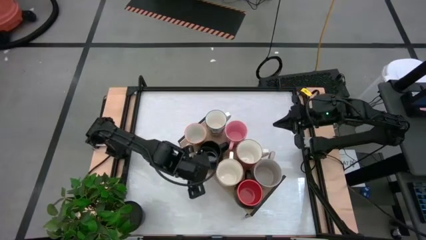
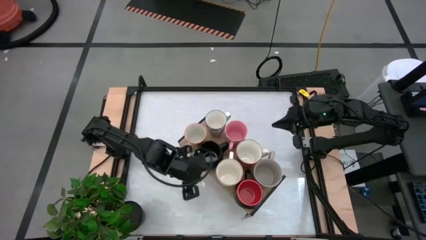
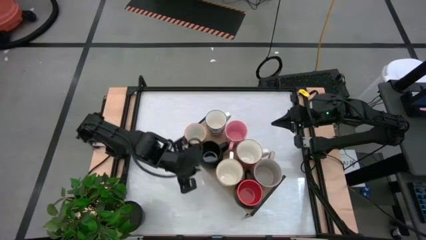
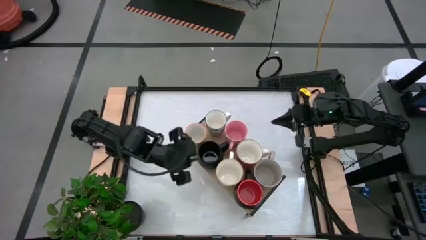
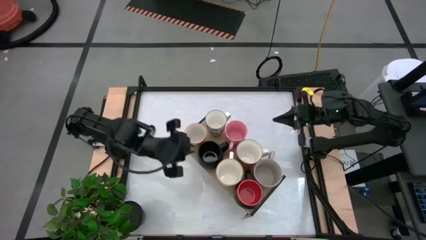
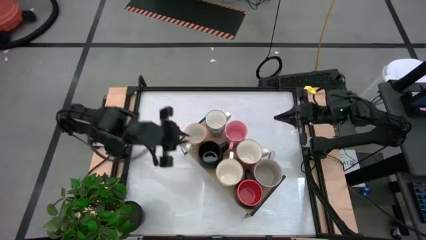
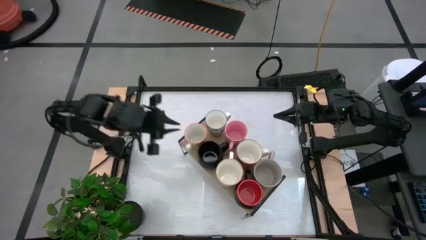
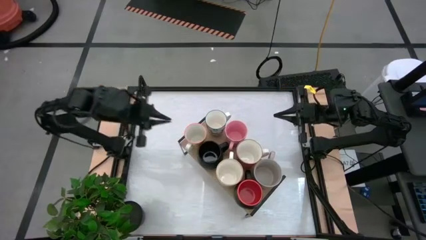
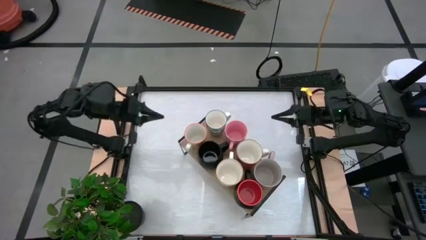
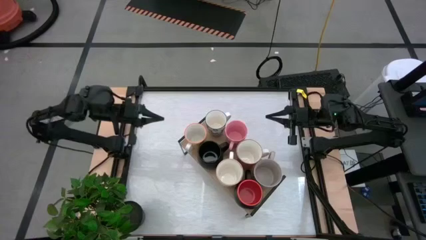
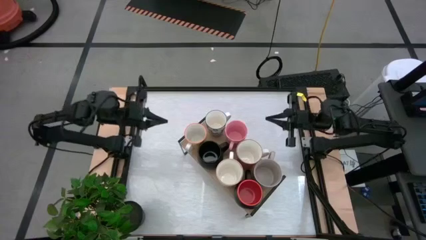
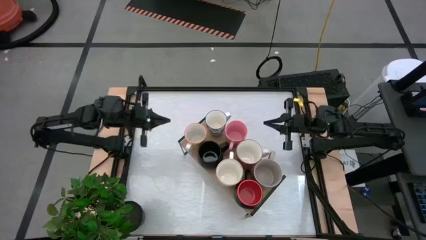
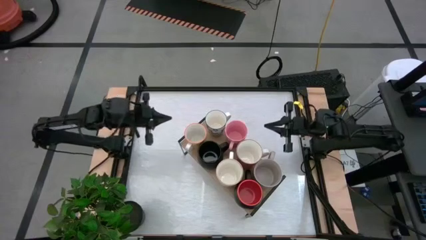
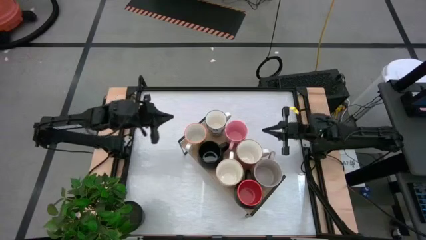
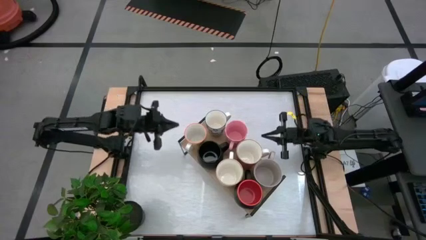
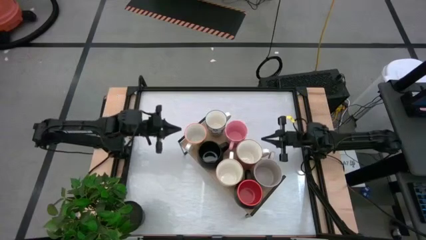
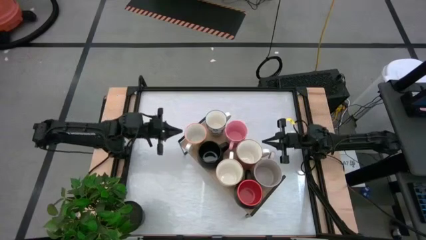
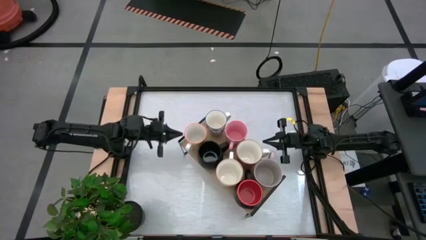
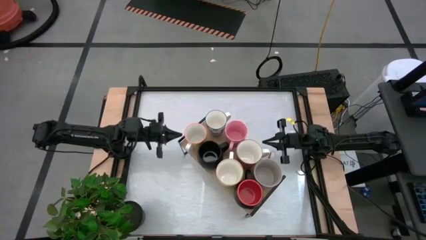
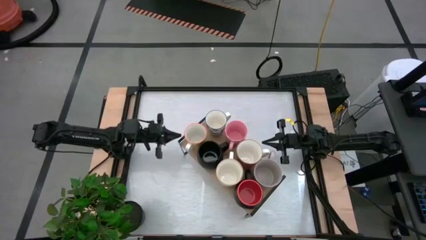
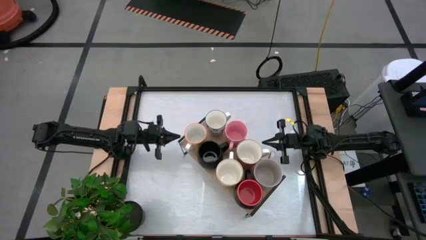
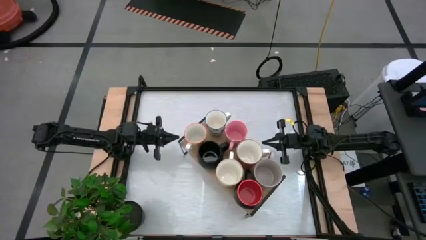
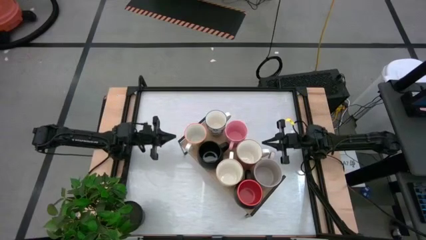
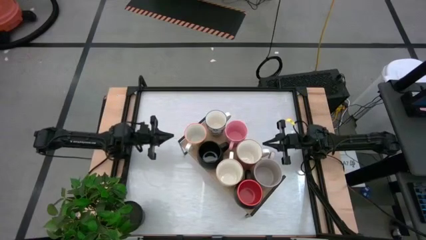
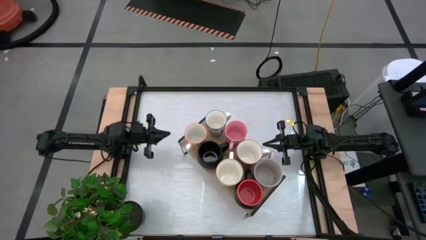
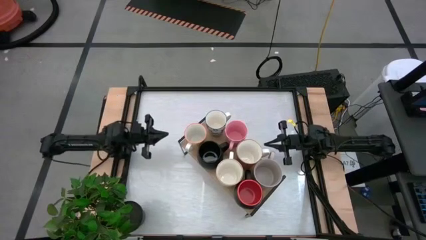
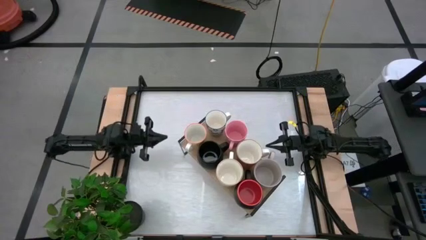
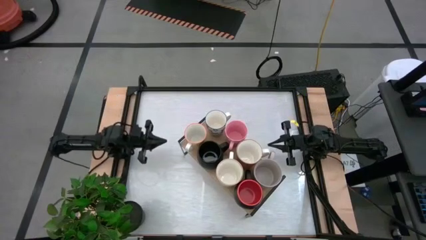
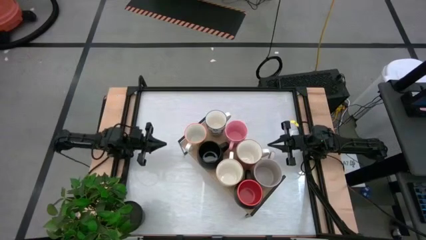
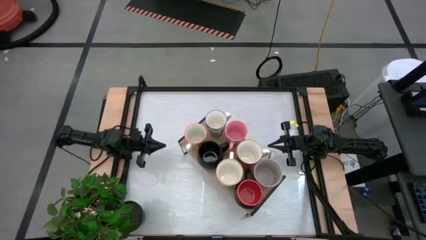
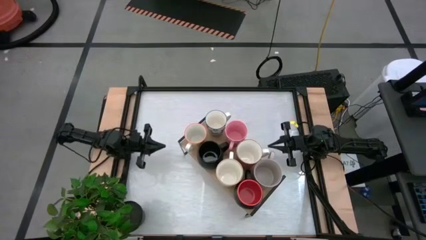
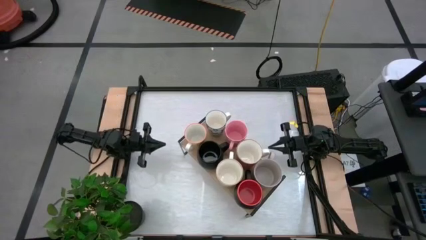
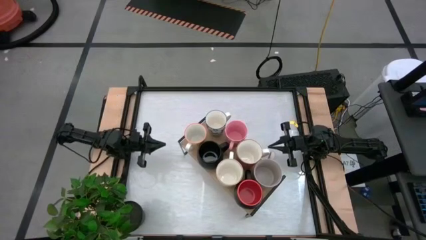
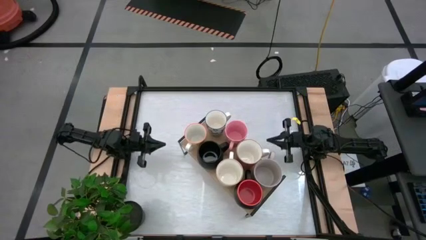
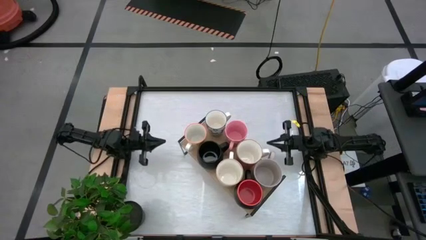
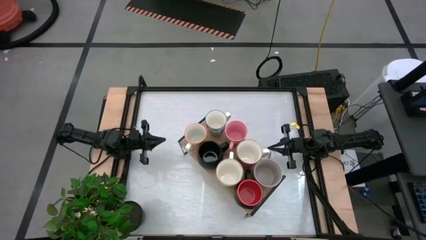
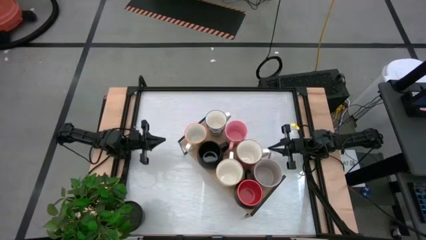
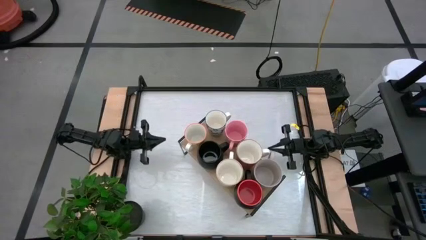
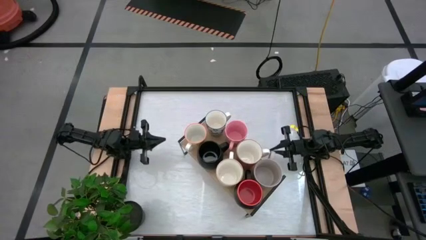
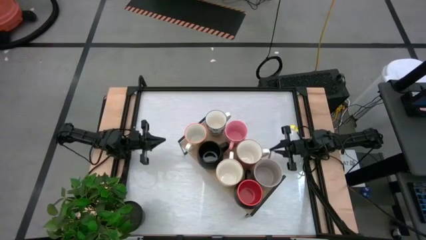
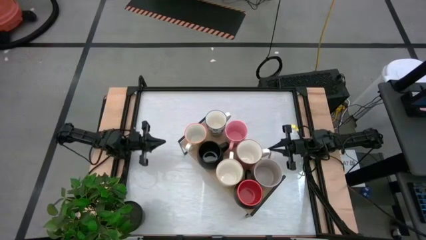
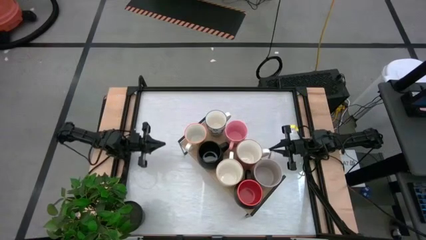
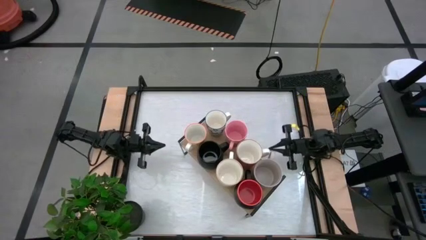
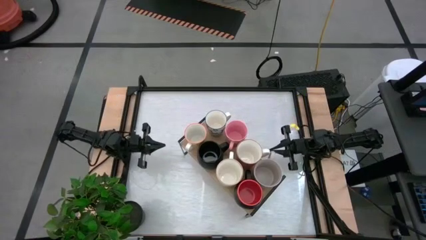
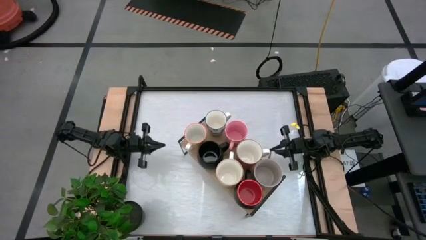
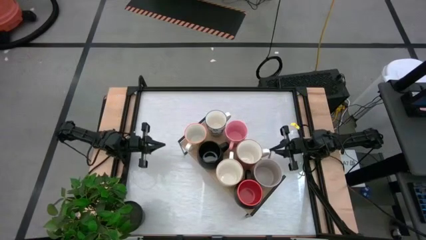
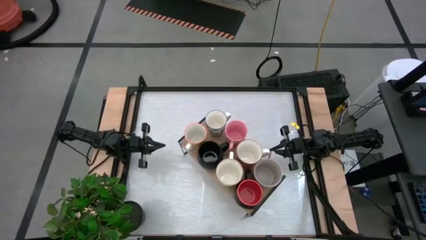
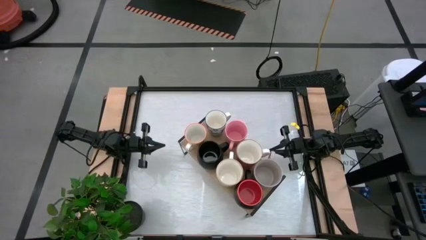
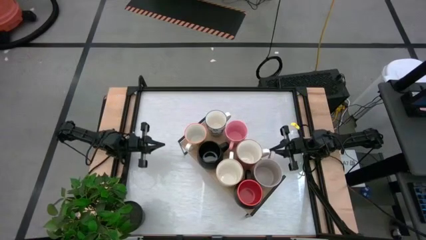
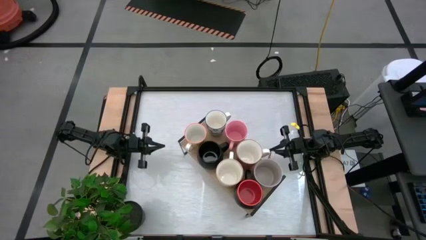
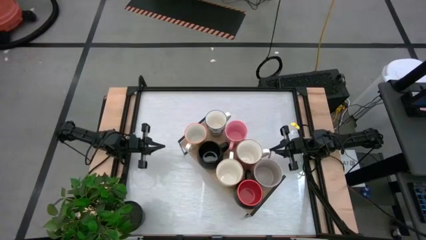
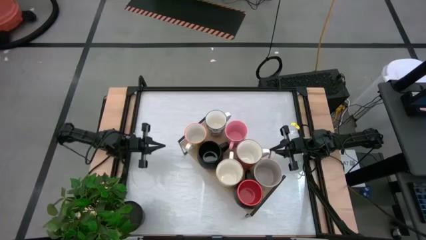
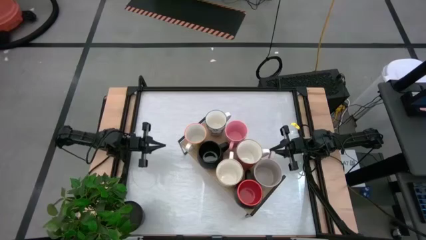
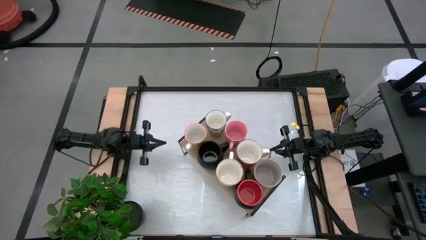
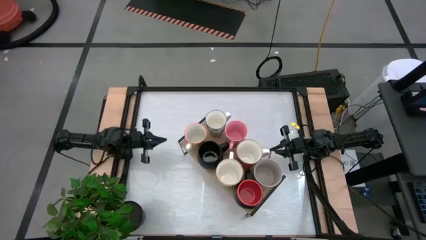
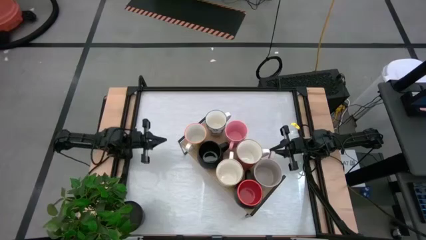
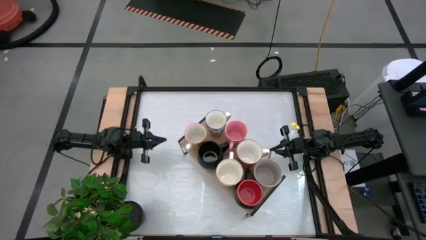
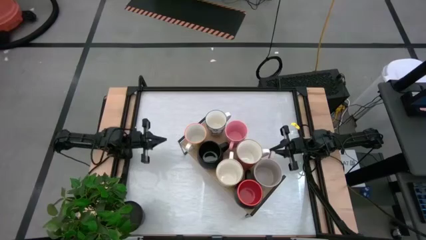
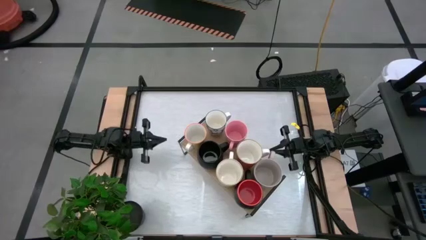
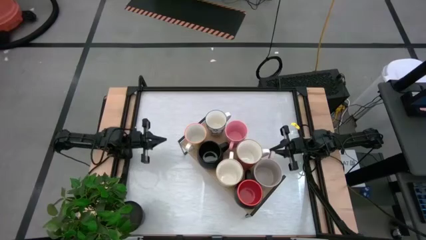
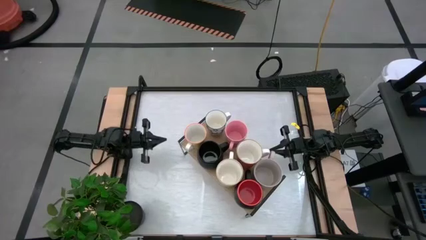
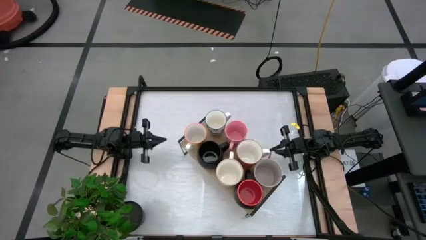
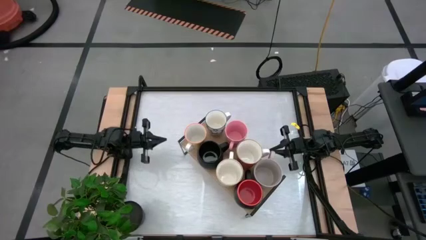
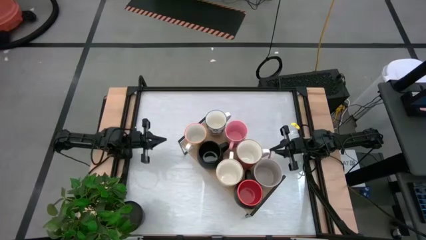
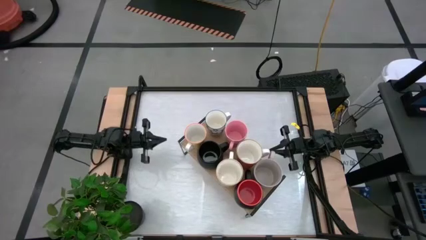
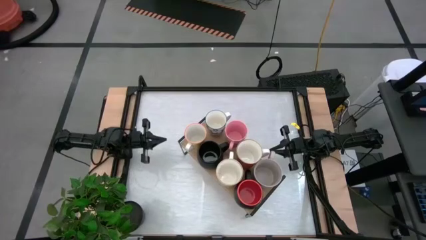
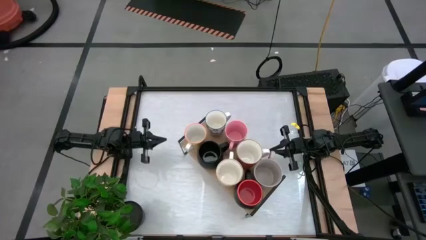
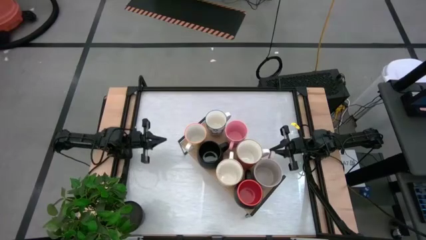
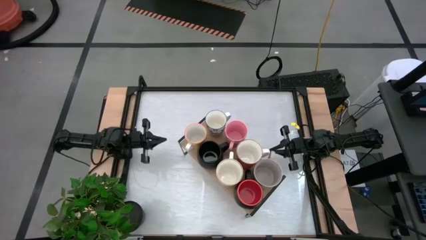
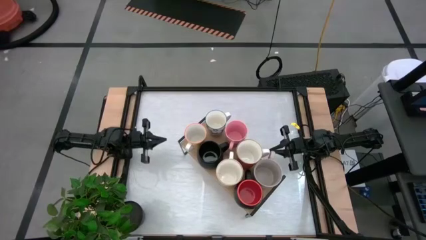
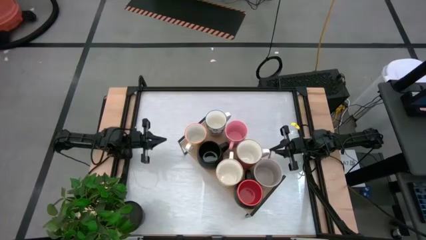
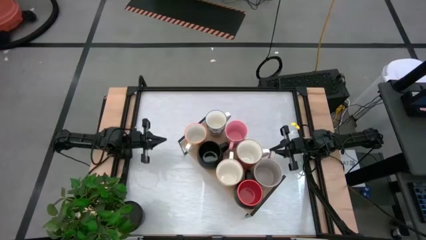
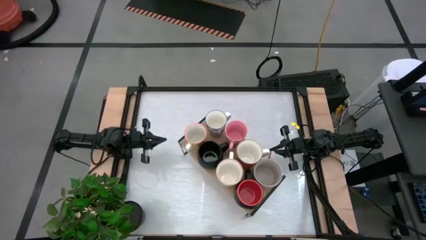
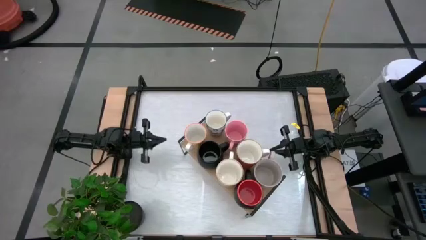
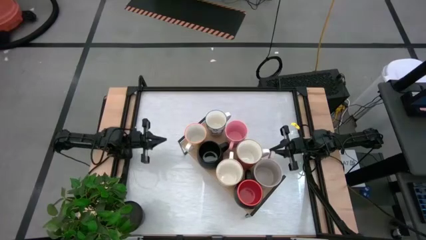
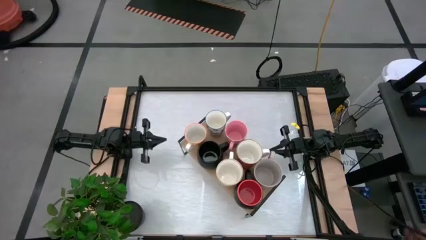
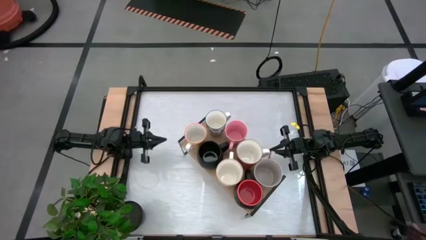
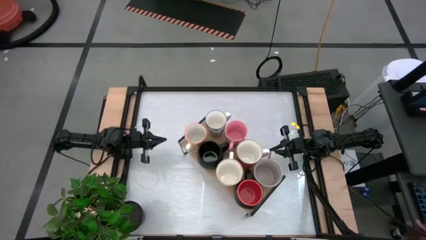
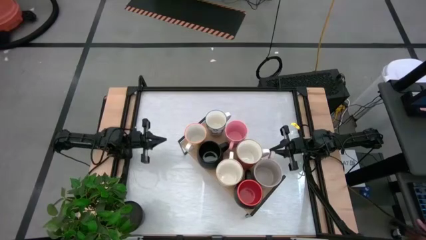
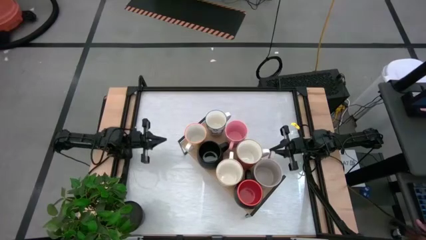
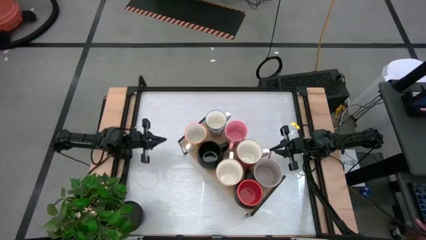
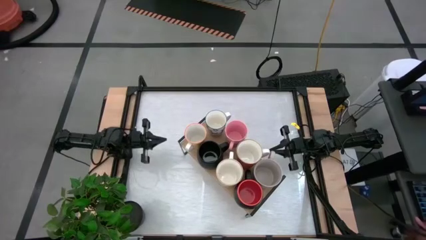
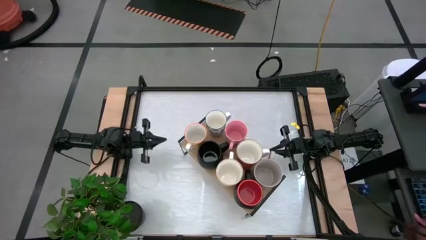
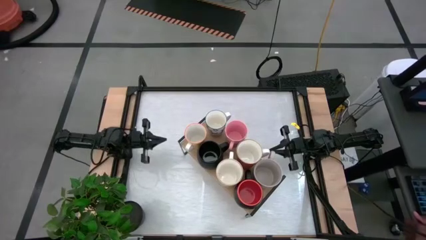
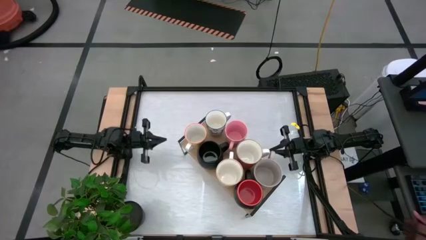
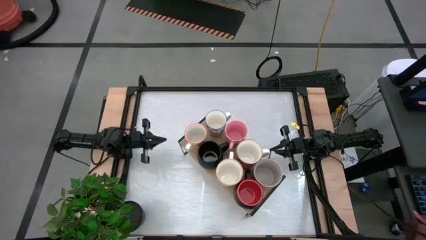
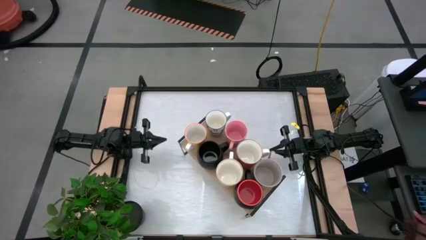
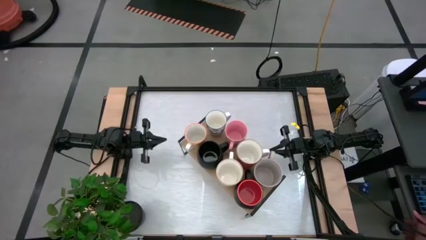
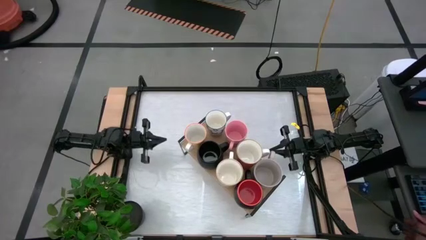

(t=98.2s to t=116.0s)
Task: Place coffee mugs
Return to Home Position
